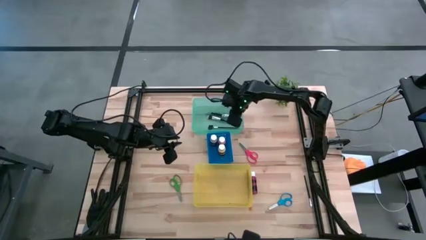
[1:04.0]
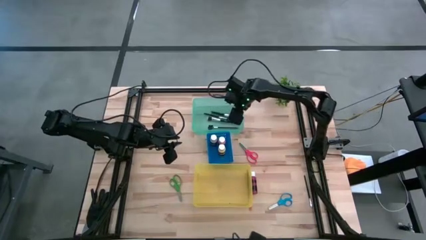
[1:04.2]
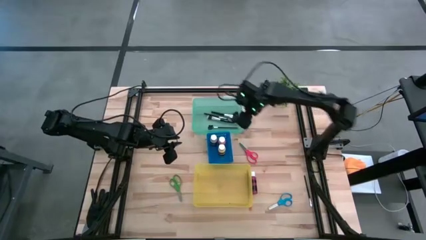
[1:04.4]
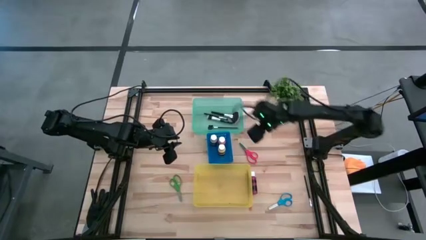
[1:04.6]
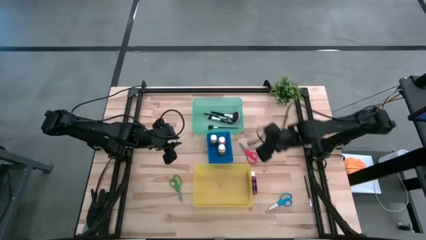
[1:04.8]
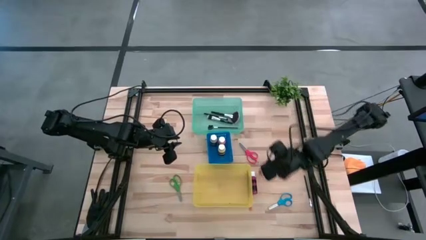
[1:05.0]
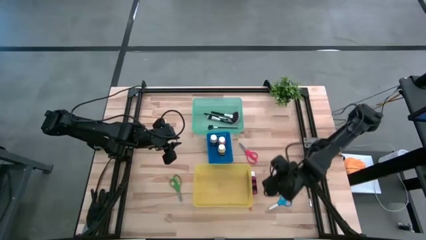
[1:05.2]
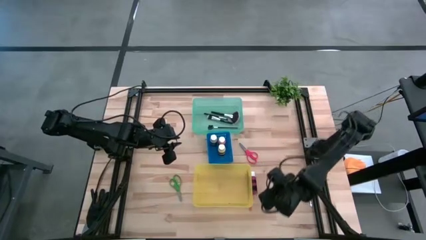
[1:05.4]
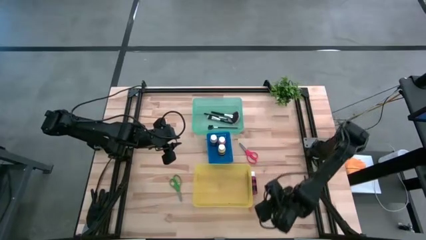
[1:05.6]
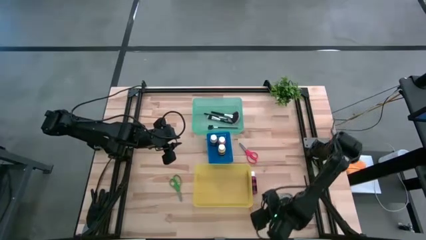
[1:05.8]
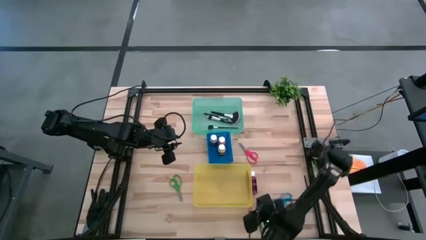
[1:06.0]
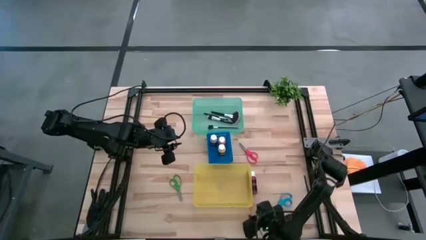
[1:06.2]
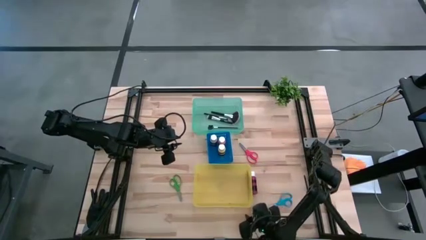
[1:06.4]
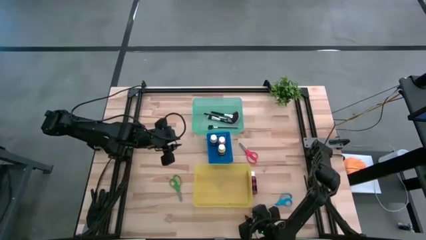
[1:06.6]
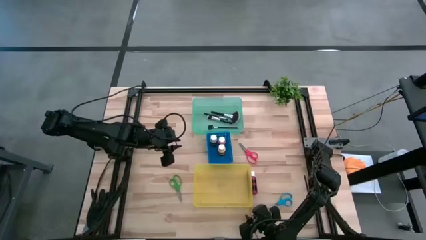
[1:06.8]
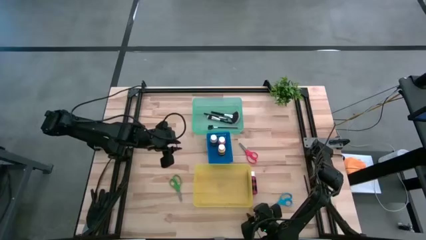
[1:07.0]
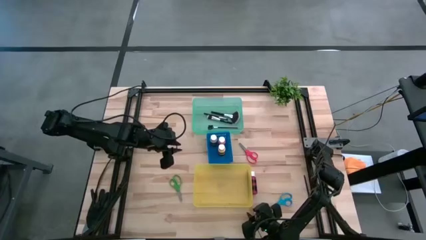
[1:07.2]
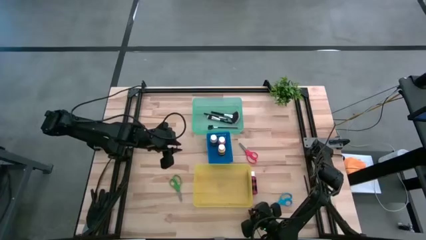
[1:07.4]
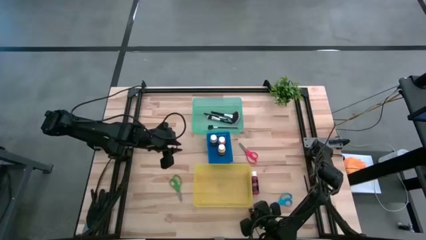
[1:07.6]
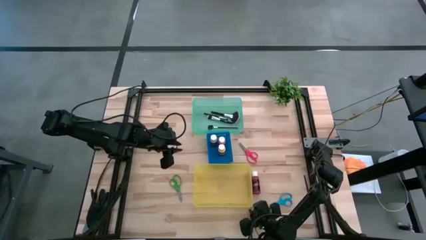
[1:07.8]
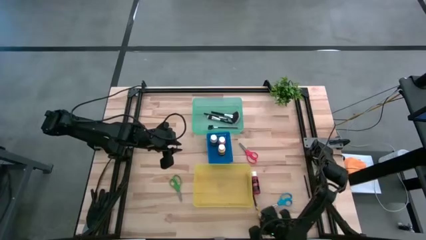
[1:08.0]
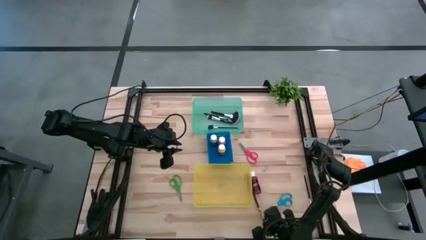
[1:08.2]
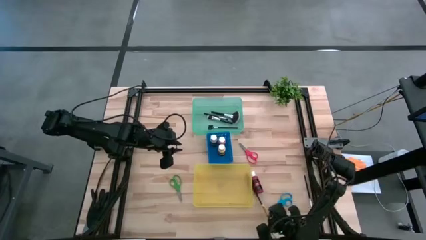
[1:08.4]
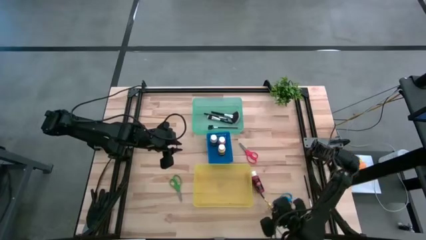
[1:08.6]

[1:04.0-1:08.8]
Task: Pick & Place Paint Supplies
Put the yellow paintbrush into the green bin

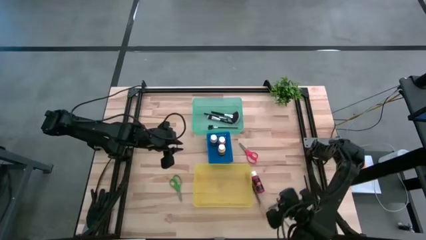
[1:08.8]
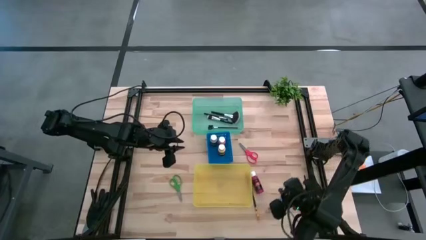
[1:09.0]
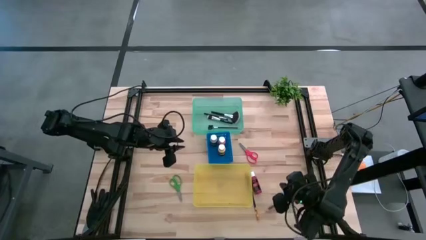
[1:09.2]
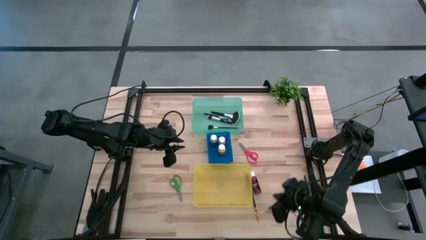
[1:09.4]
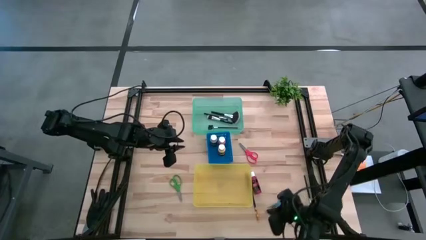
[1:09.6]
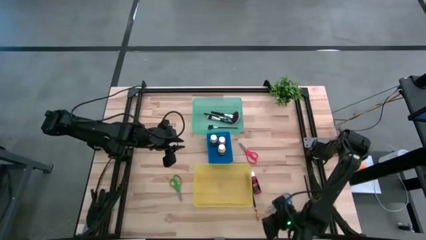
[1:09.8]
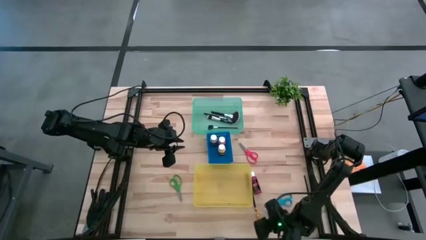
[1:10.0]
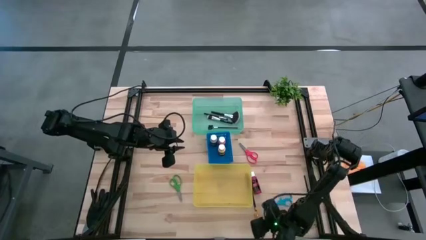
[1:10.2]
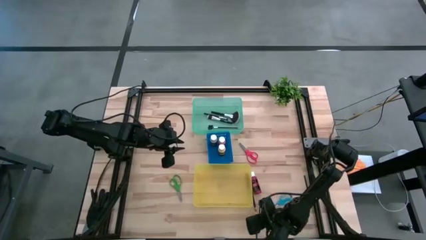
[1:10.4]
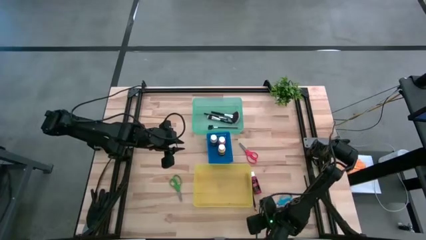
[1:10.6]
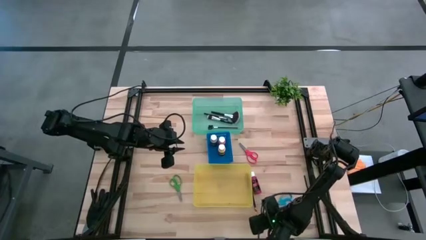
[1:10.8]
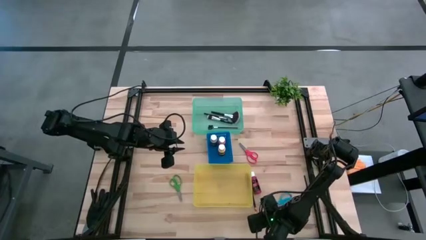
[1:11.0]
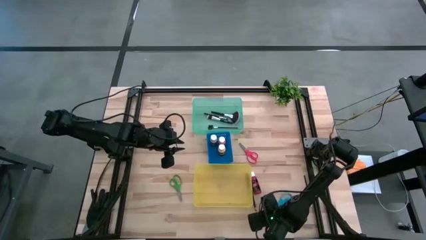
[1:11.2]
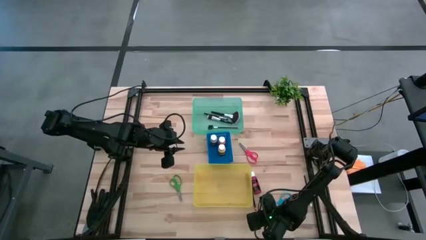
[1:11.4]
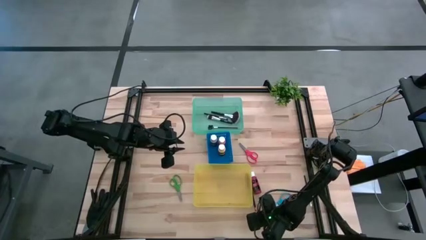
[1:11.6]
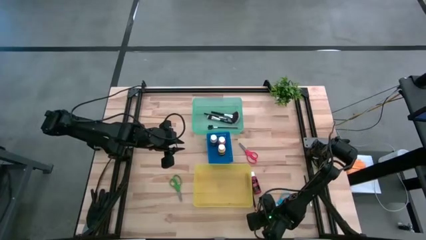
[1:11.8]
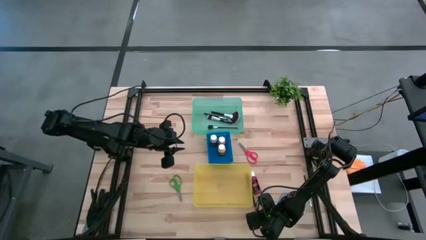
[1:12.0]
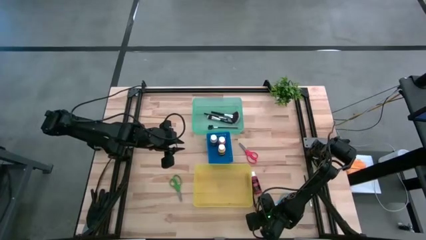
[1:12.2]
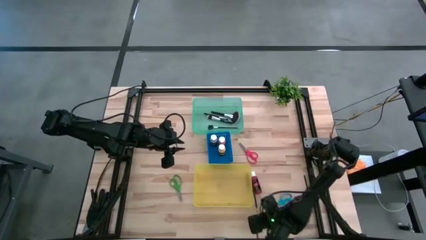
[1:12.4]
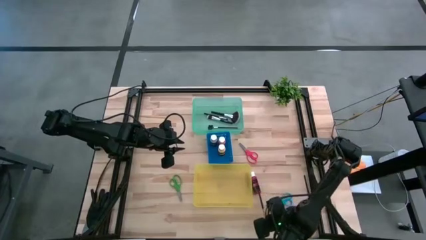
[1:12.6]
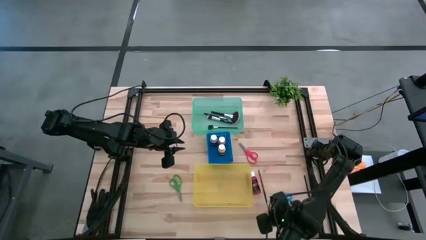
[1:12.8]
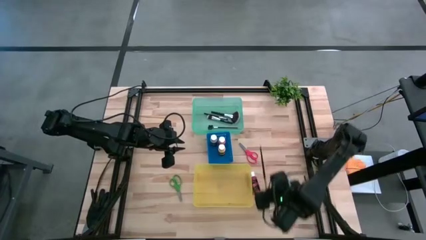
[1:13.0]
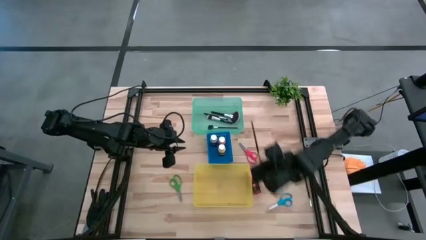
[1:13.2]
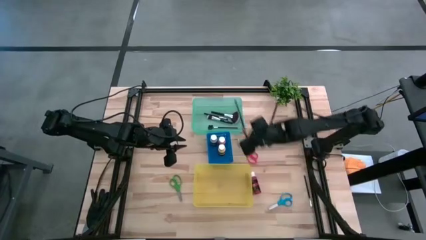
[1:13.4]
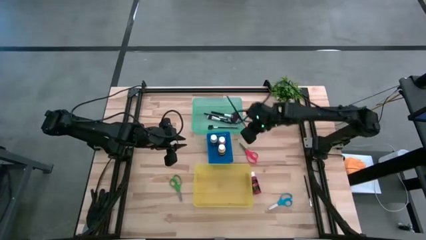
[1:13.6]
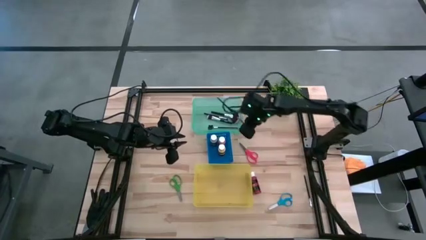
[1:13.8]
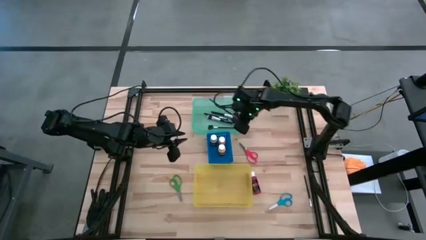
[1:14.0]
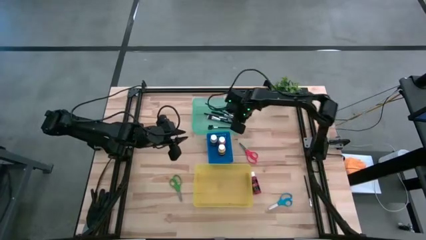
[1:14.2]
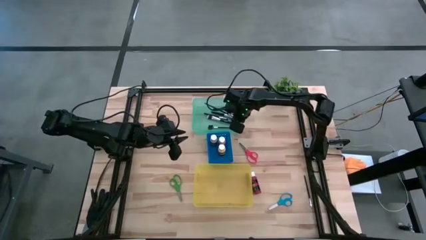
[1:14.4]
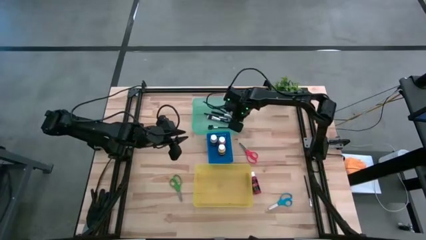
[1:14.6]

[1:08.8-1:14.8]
Put the yellow paintbrush into the green bin
